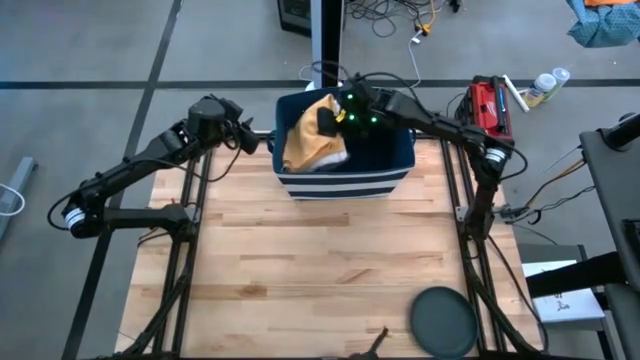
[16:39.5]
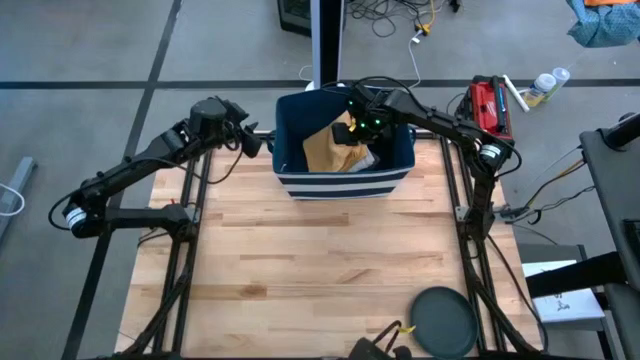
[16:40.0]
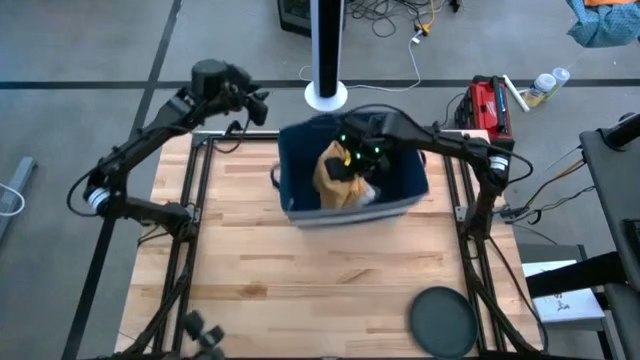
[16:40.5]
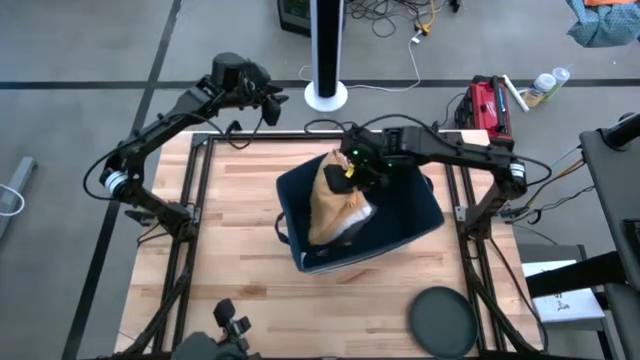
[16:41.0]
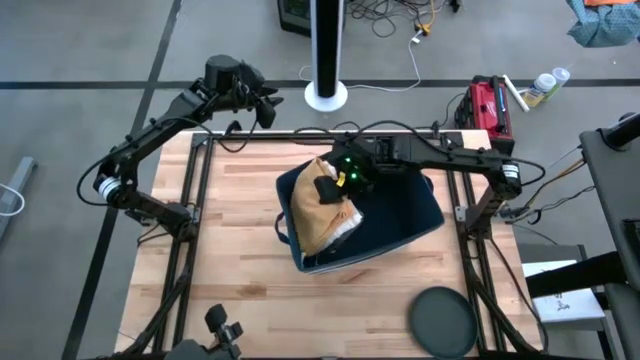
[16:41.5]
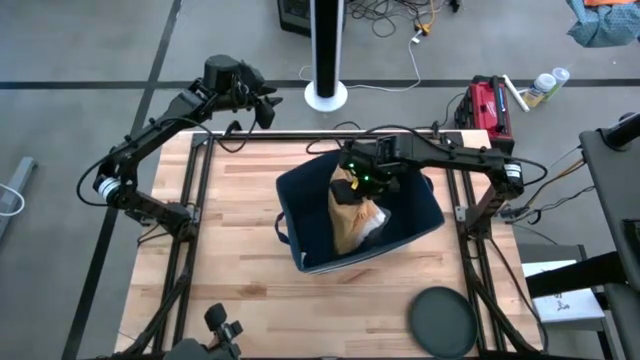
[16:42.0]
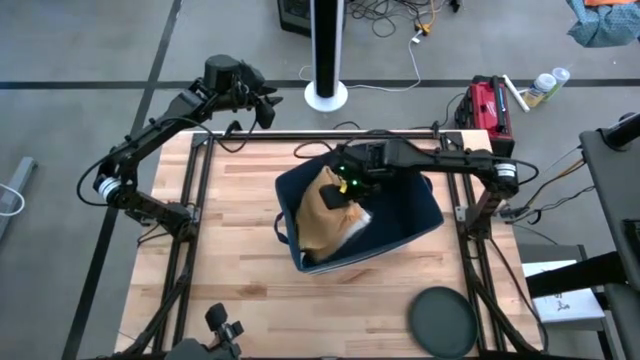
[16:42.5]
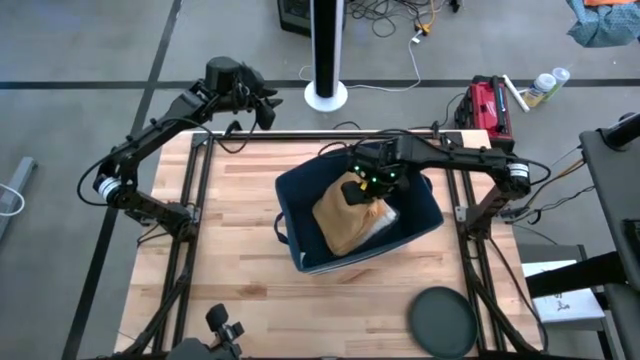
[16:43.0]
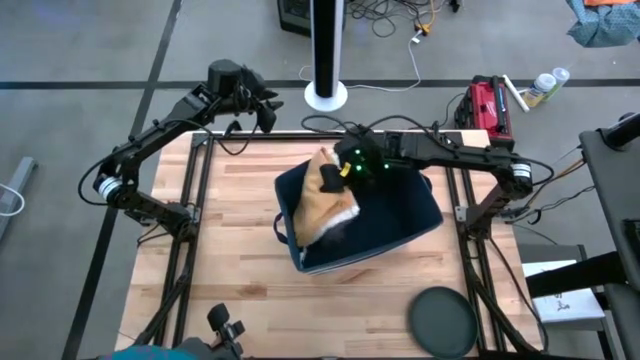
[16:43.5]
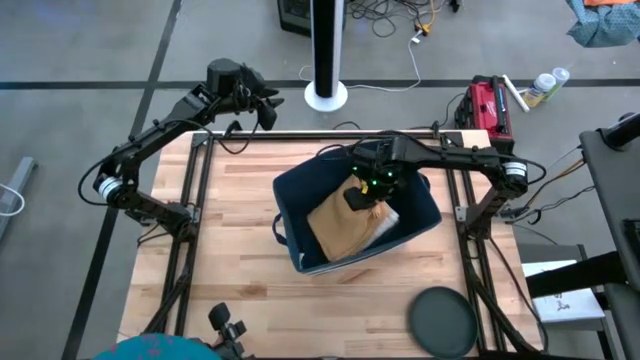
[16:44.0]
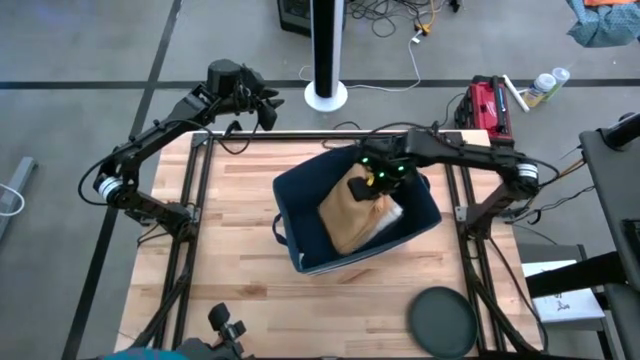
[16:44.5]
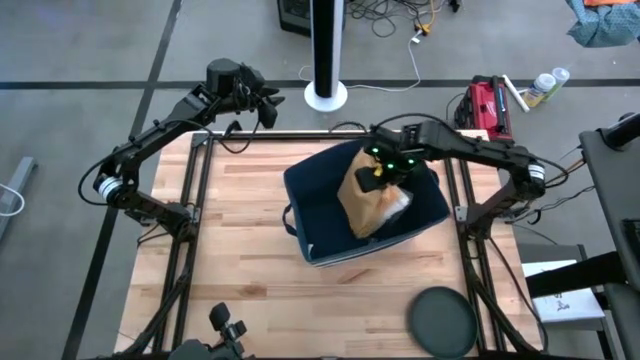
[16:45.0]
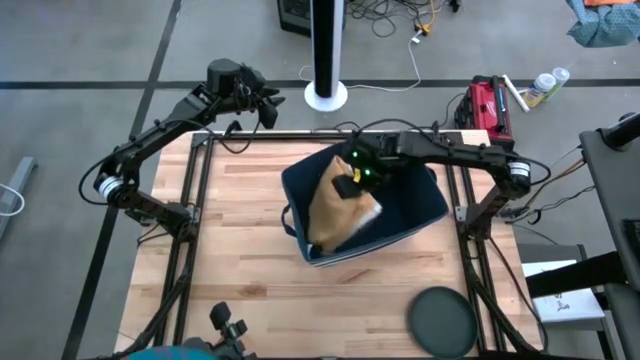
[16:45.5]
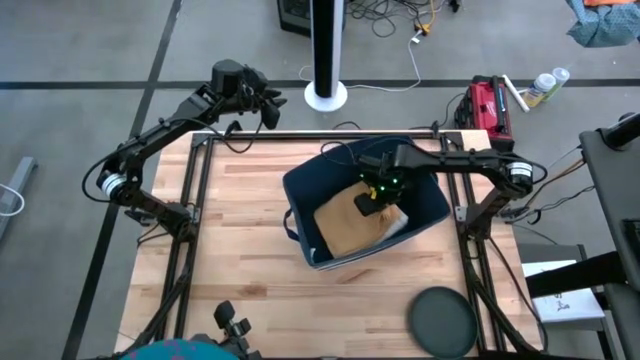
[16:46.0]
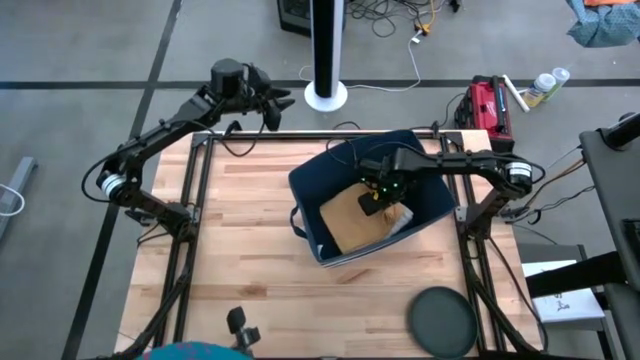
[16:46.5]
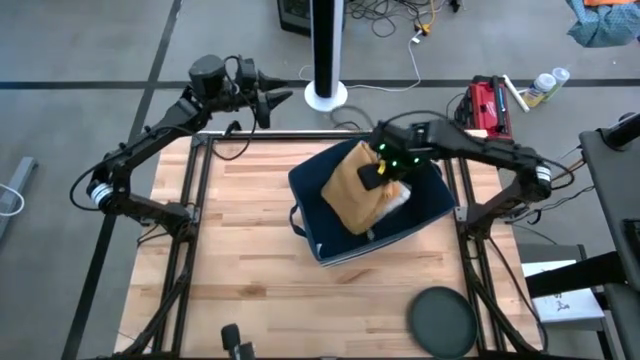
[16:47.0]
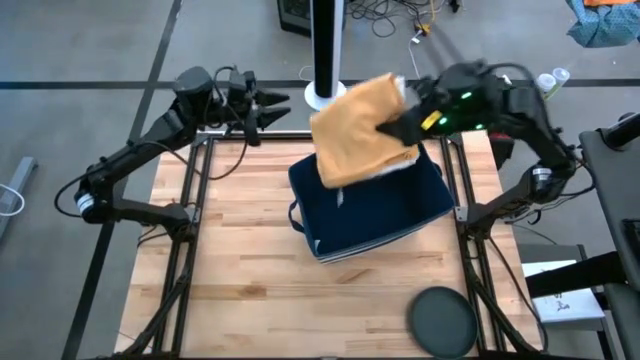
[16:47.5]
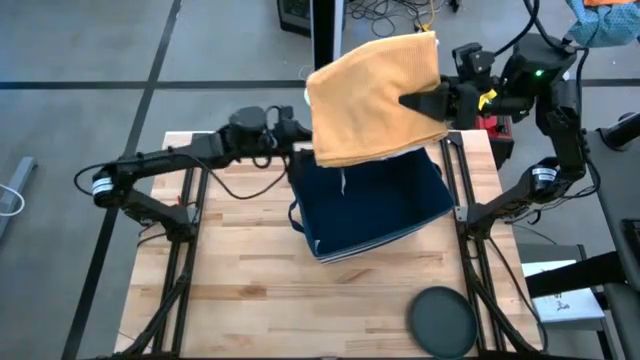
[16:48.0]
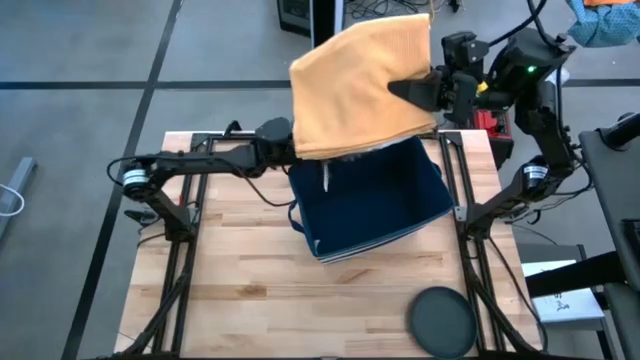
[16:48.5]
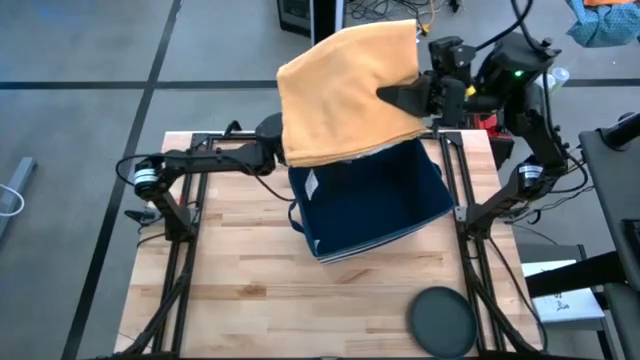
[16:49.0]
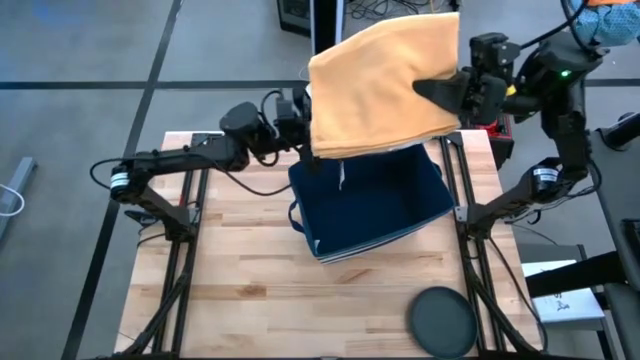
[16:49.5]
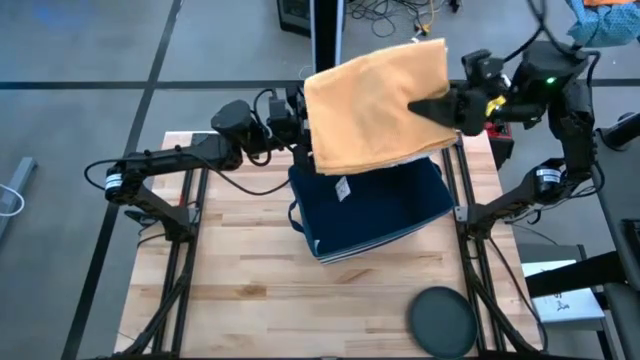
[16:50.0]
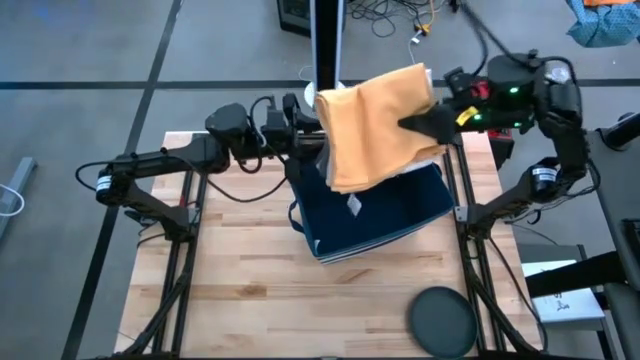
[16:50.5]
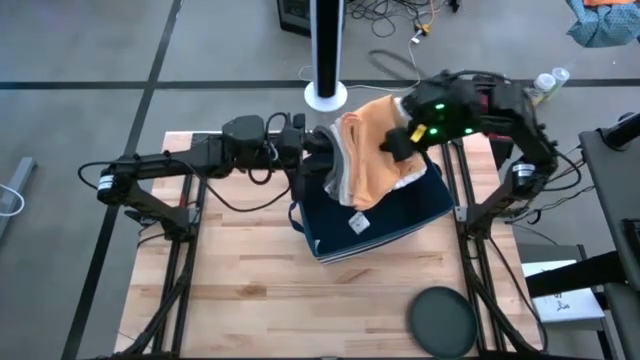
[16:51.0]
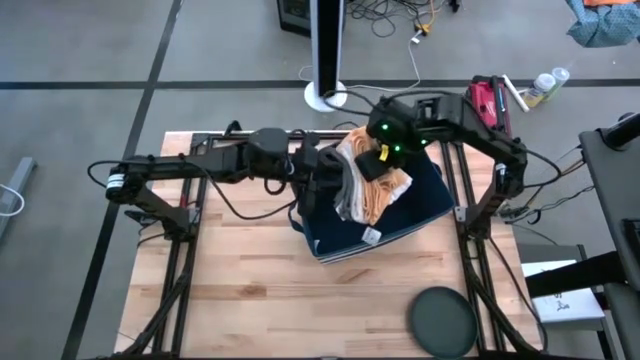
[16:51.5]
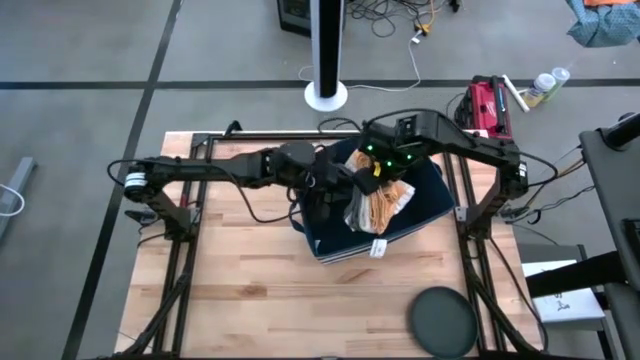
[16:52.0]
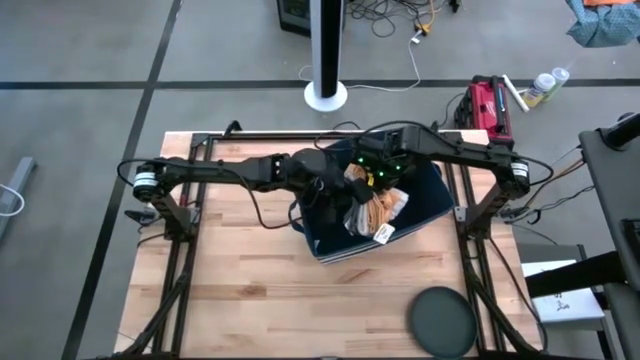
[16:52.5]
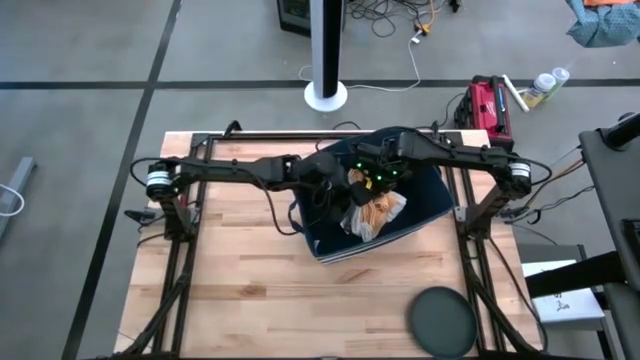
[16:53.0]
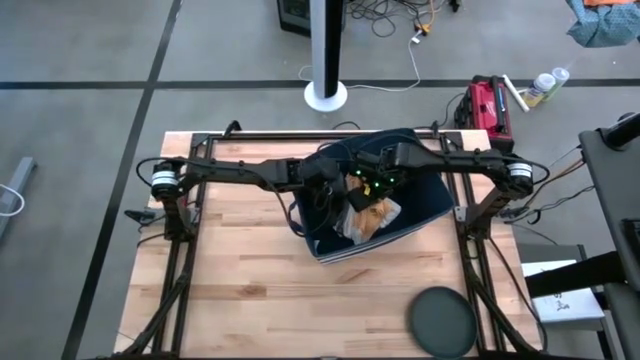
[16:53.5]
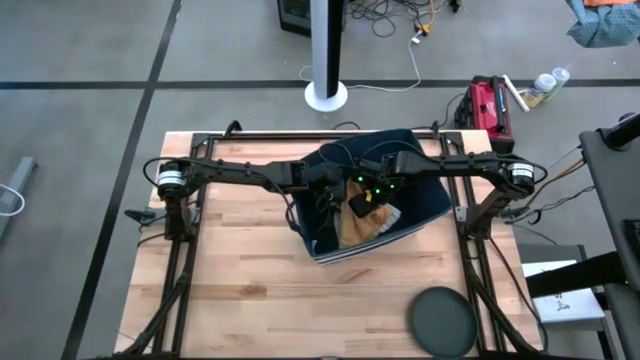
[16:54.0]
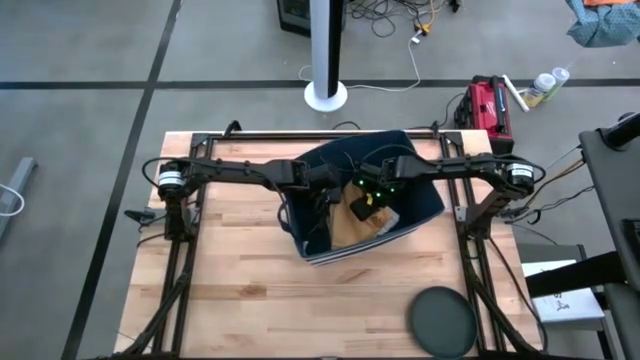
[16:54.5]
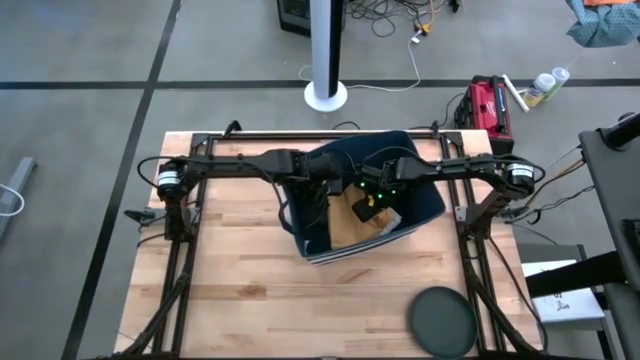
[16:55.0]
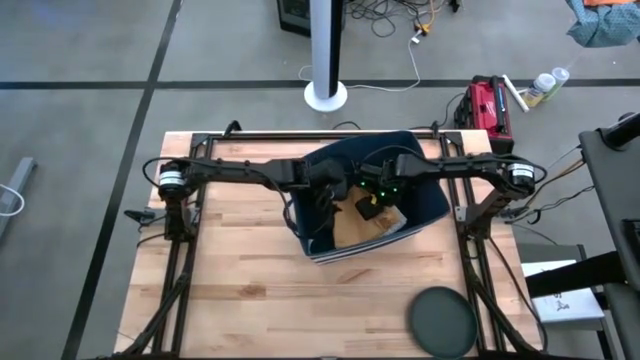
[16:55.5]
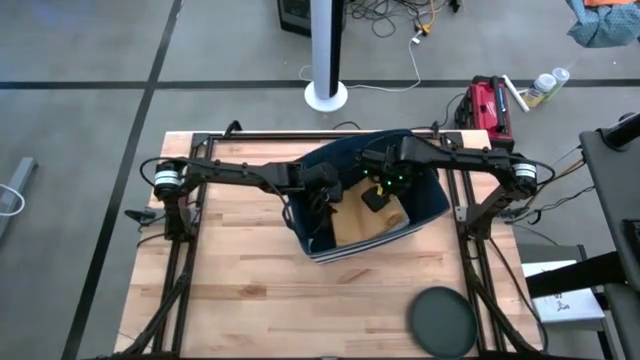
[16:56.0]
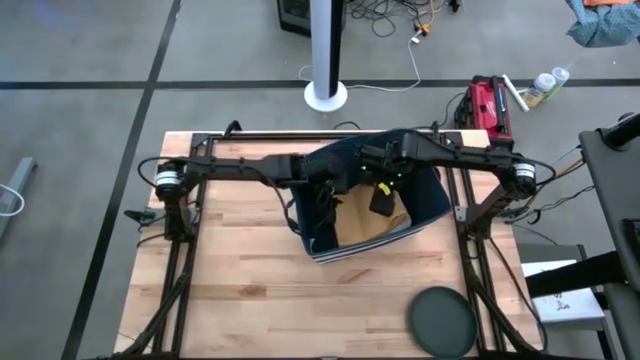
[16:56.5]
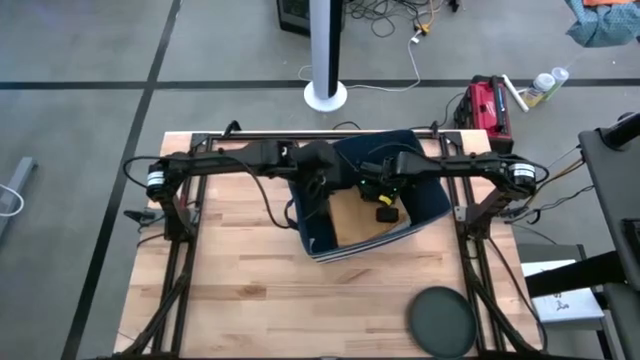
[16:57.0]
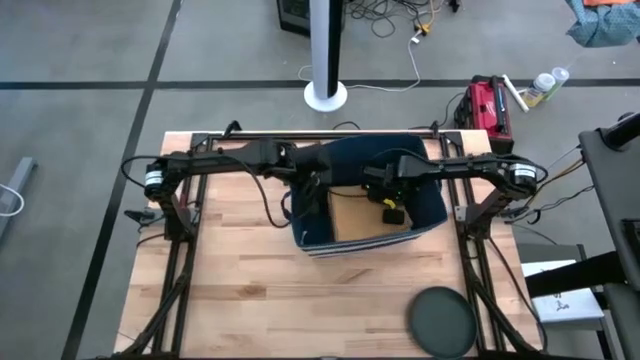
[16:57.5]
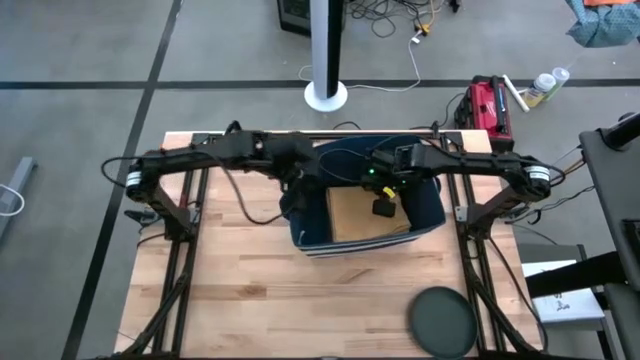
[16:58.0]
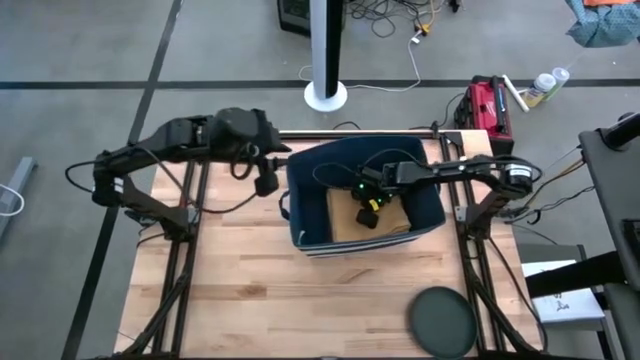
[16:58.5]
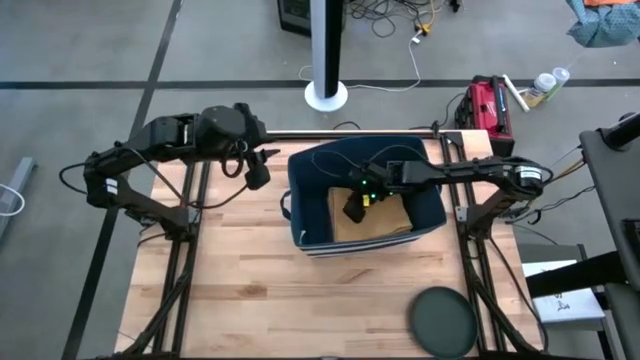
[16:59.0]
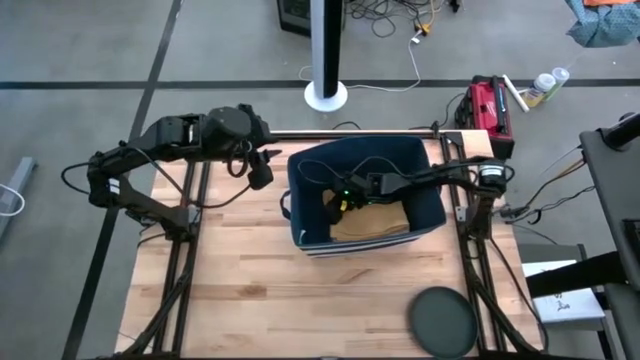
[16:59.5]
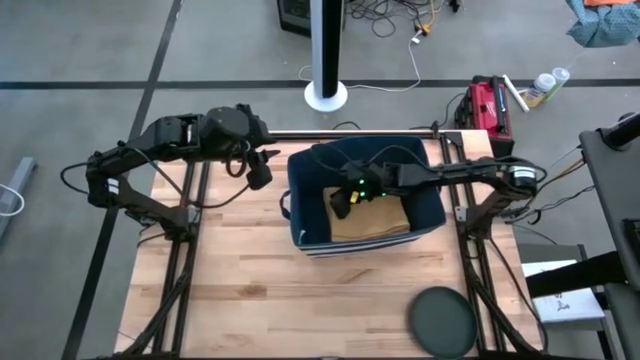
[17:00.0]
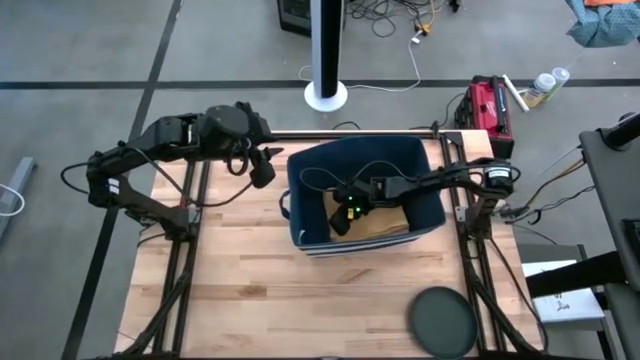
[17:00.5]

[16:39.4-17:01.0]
Task: Fold kitchen towel into neat rectangle
Put the stacked towels into the blue laundry bin

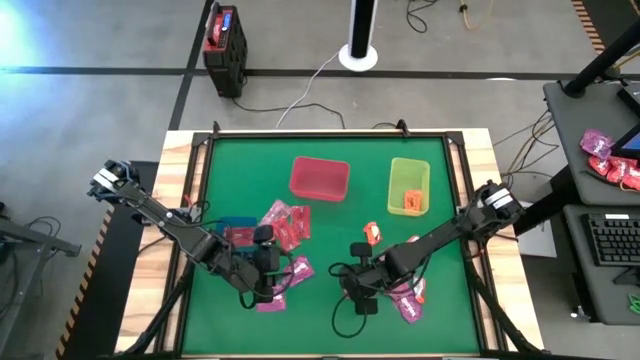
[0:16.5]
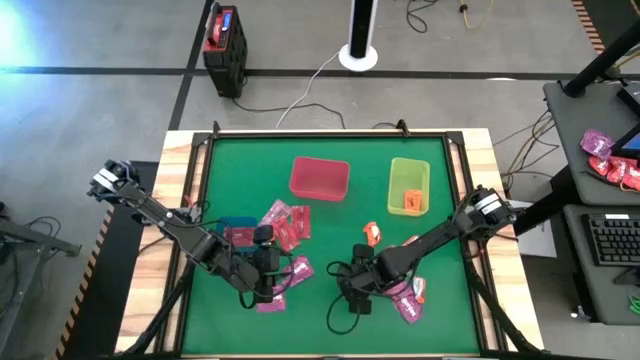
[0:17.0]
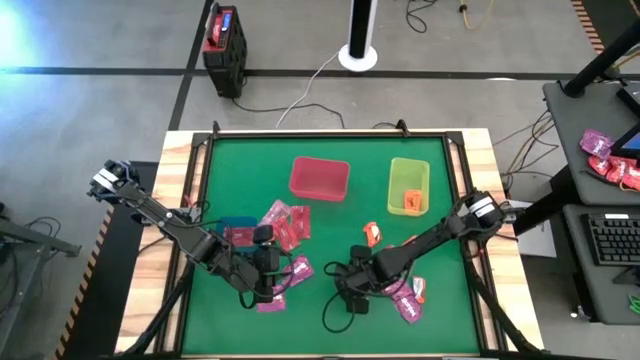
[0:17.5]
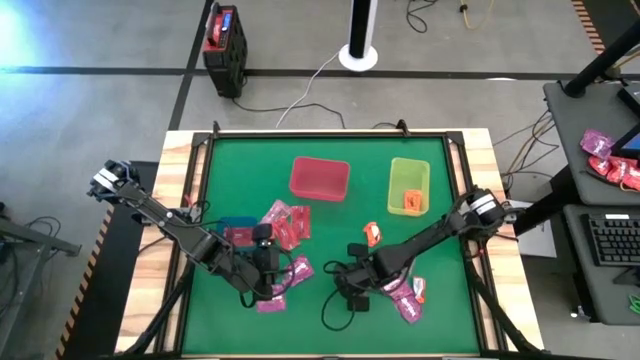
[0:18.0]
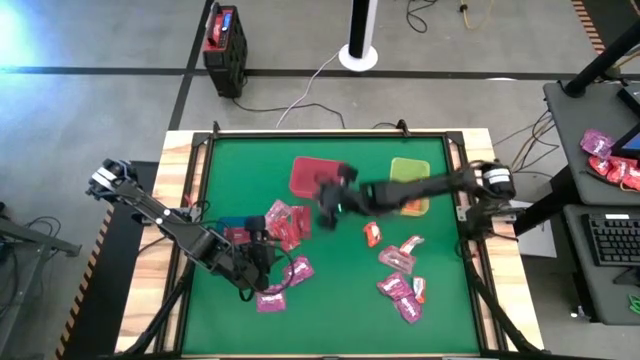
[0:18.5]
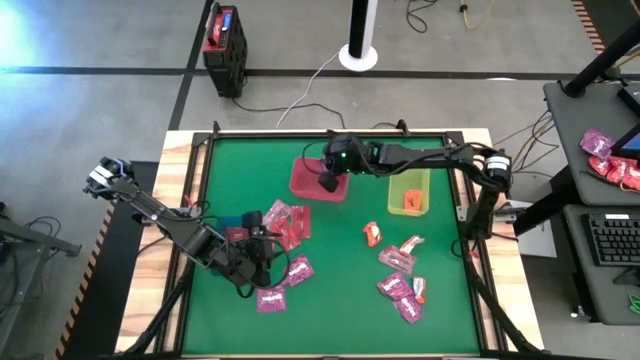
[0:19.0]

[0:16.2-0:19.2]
Task: Sort candy by brand, put in halloween buckets
Put the violet candy into the red bin
